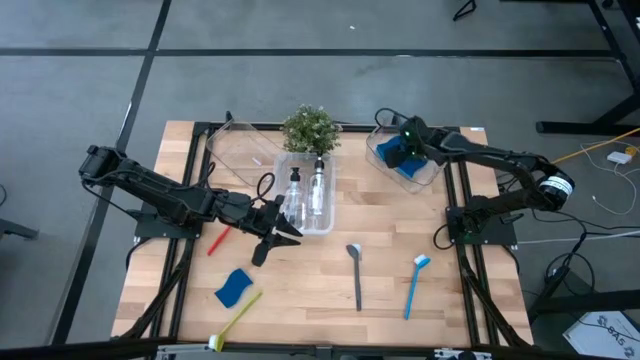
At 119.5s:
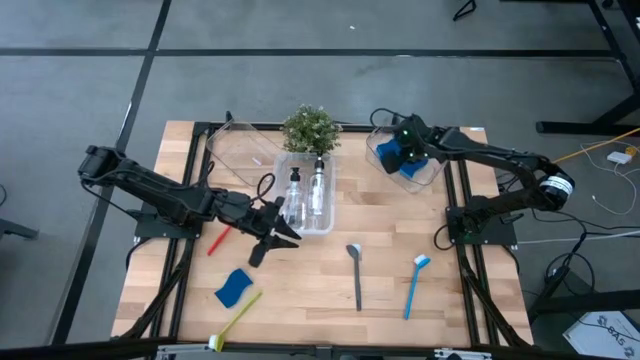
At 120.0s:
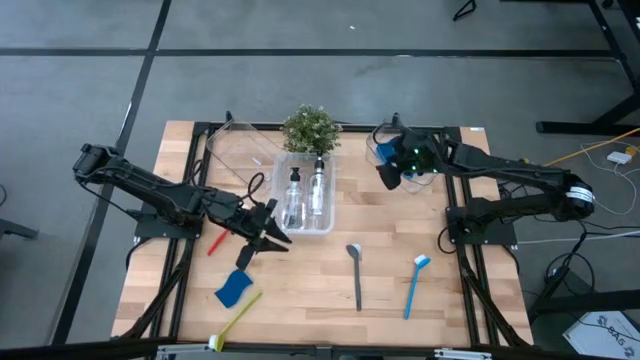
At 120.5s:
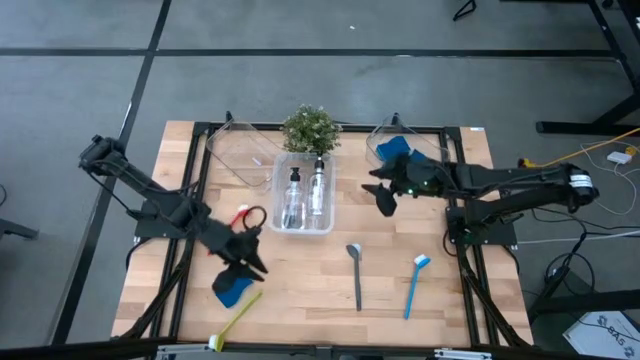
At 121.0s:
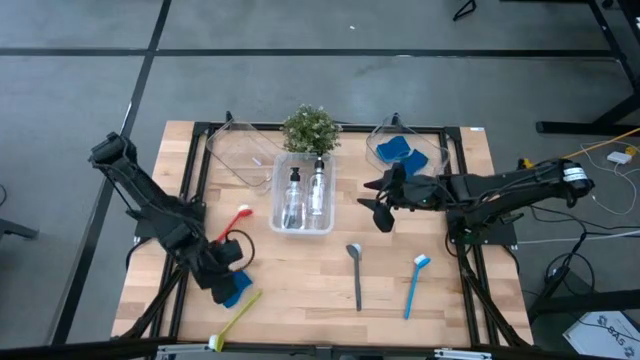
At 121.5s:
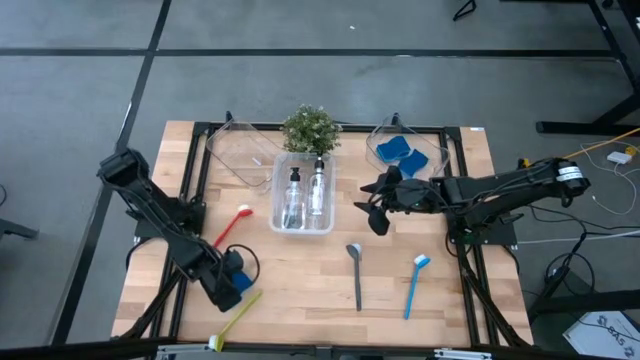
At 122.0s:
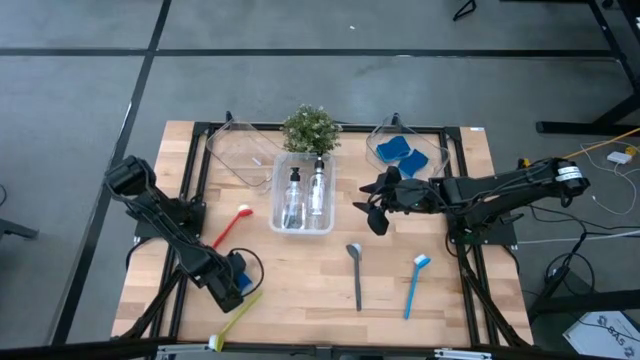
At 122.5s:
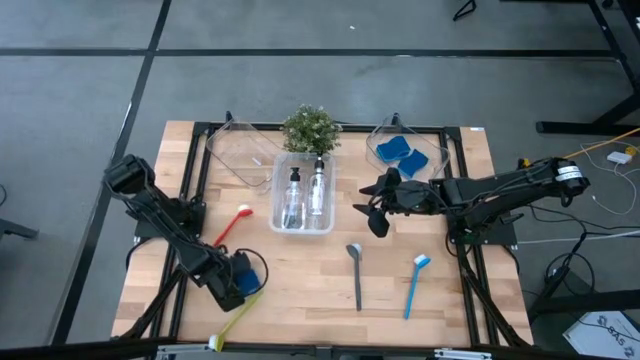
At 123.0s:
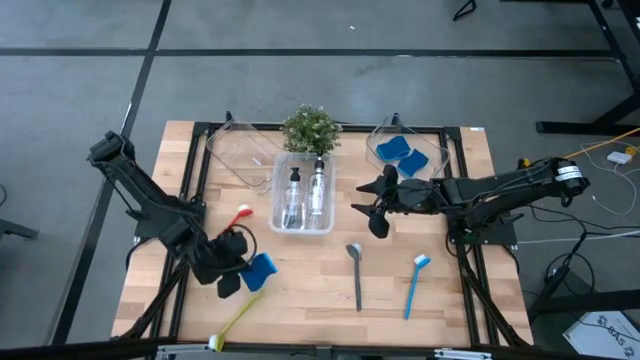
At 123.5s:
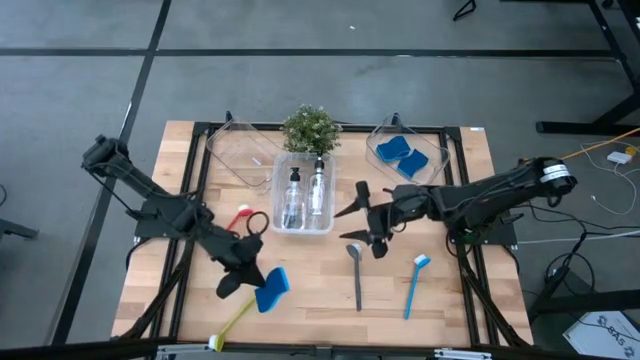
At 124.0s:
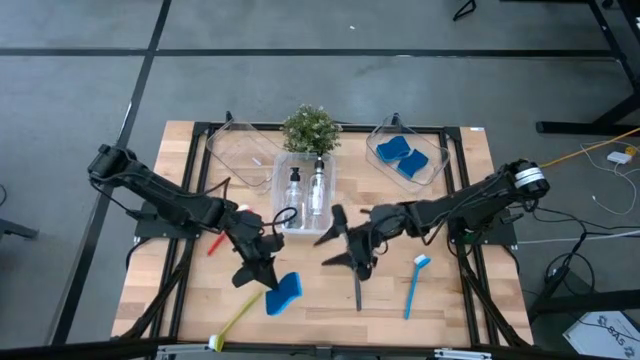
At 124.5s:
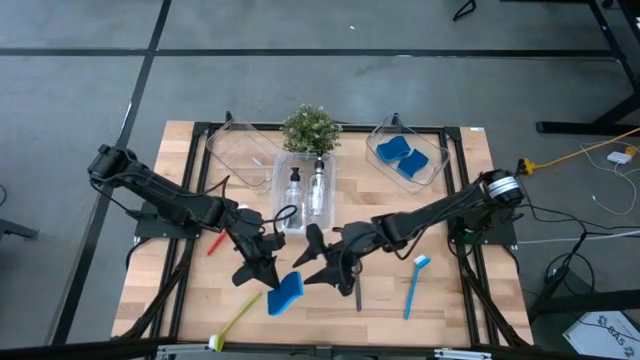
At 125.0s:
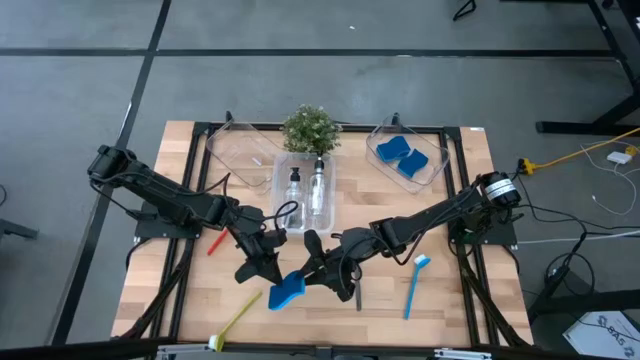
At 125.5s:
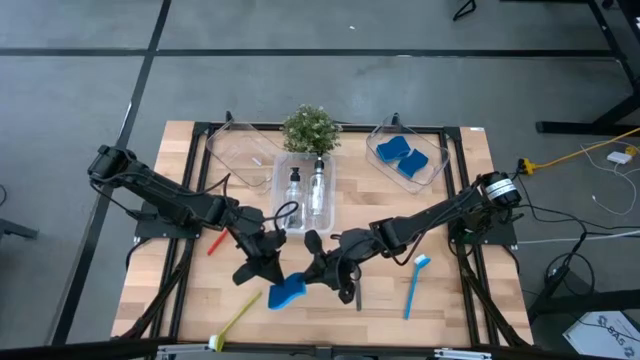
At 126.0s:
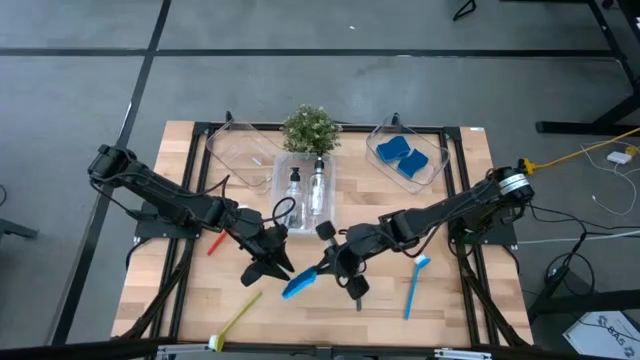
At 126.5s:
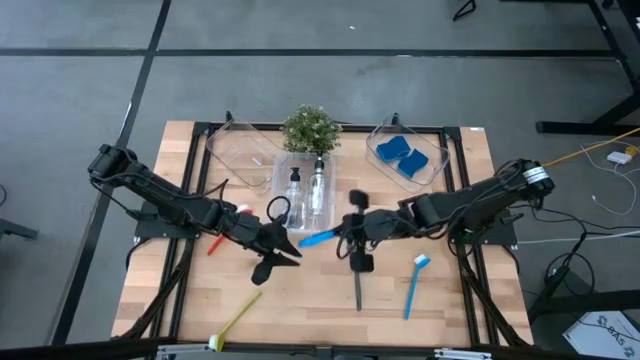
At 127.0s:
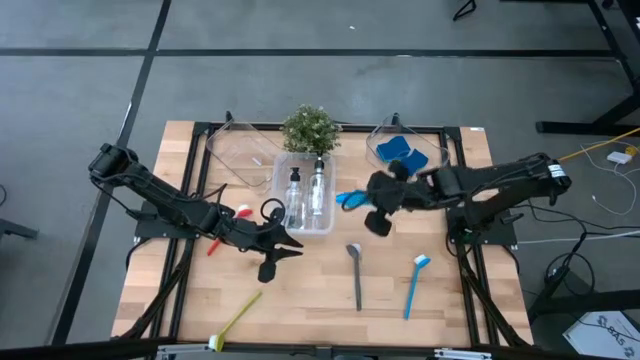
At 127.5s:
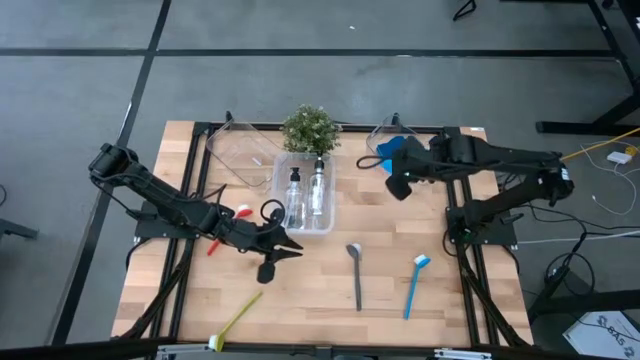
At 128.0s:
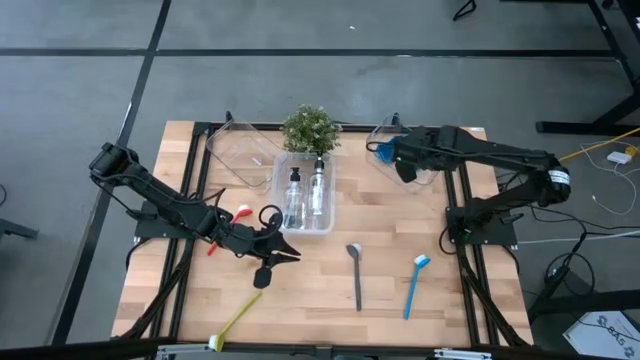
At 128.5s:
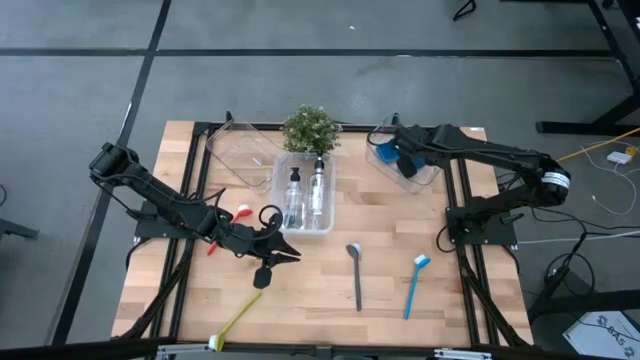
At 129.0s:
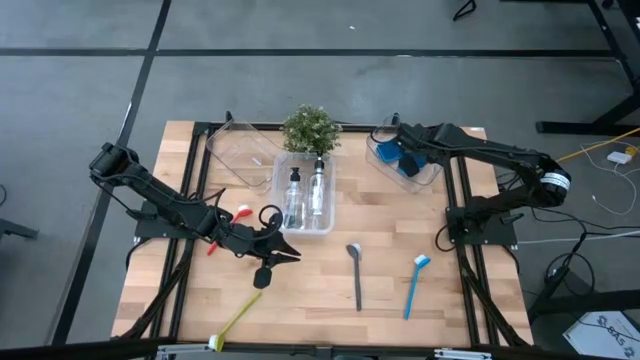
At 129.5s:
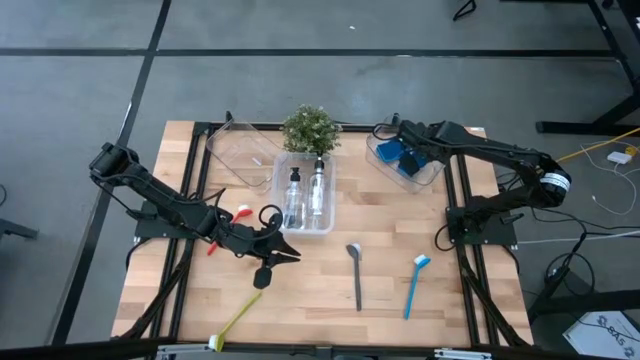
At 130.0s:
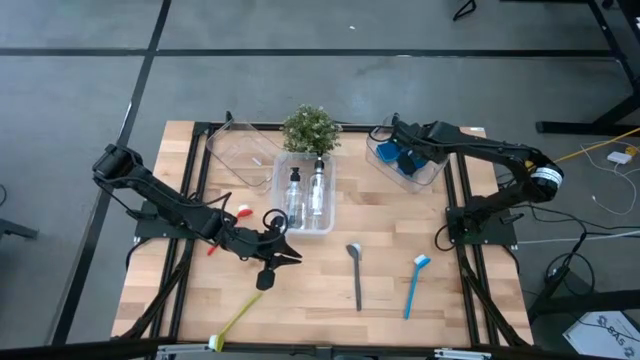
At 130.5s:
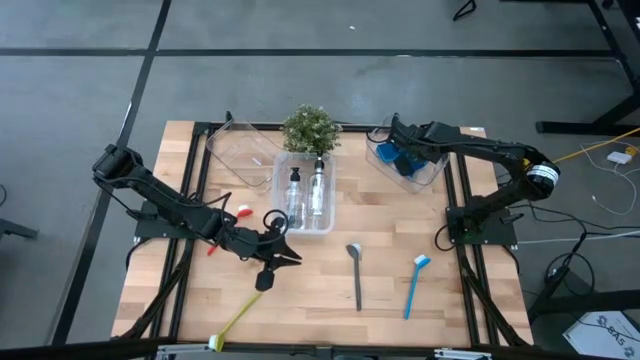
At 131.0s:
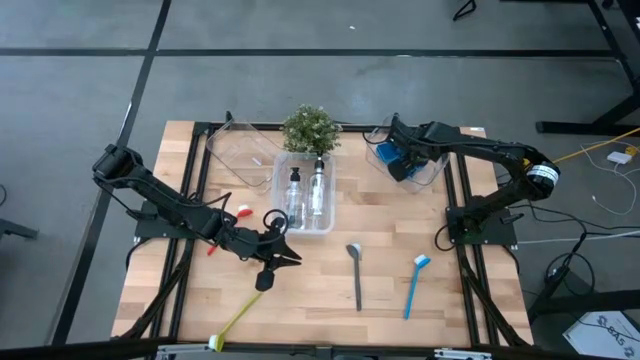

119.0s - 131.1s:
Task: Pick & Place Kitchen Sink Supplies
Put the blue sponge into the right transparent bin

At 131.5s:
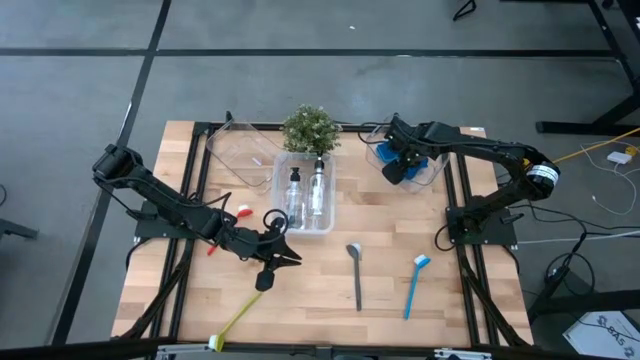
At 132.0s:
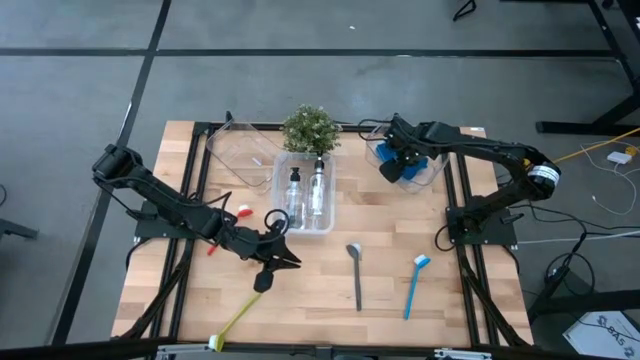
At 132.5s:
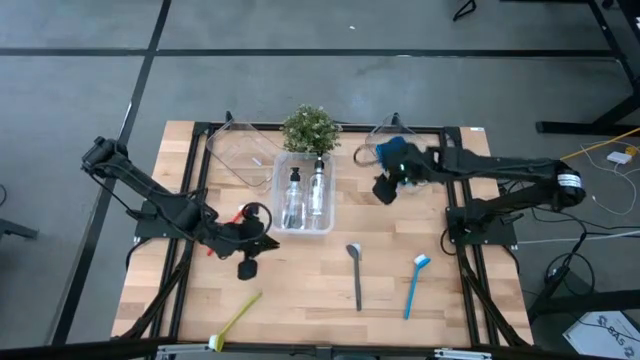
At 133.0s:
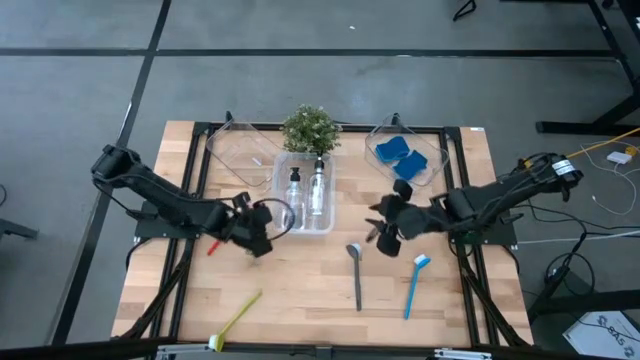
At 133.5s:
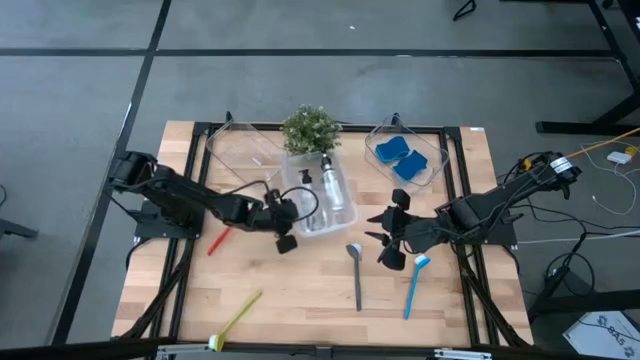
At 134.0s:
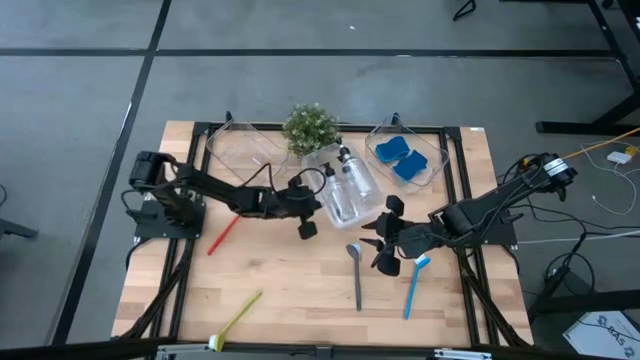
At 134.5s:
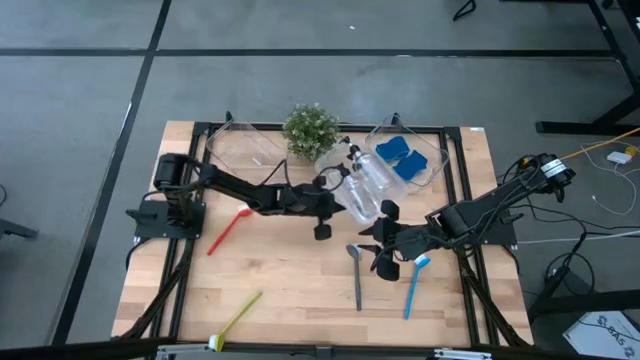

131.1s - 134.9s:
Move the white bin to the top right of the table

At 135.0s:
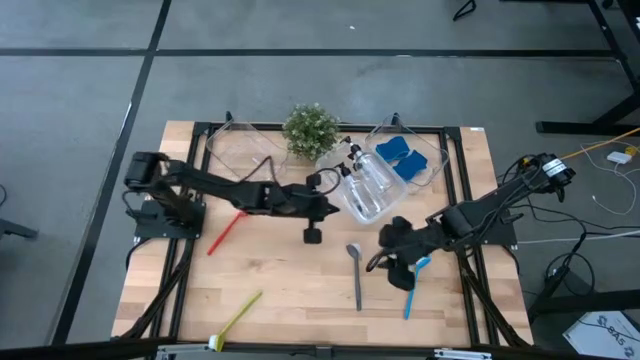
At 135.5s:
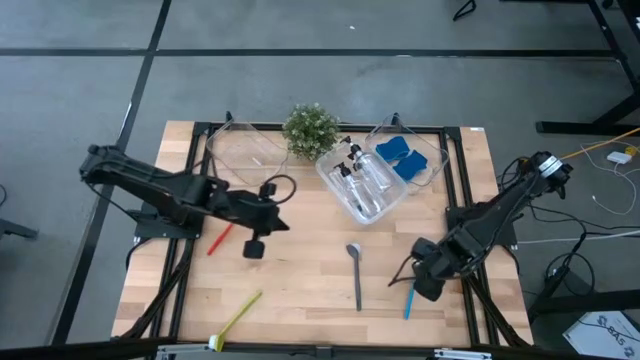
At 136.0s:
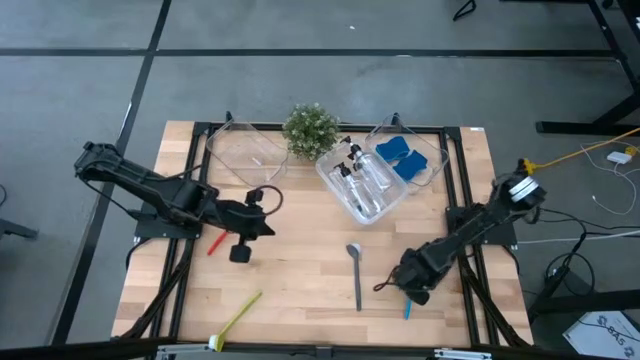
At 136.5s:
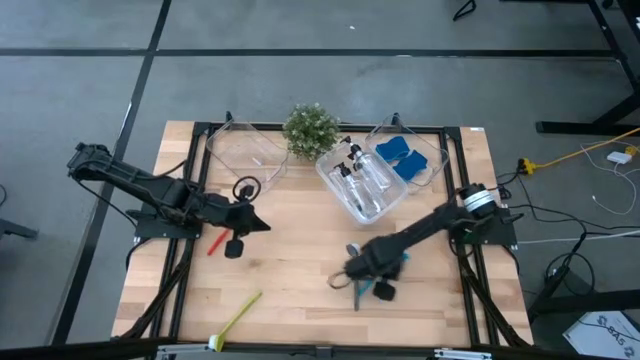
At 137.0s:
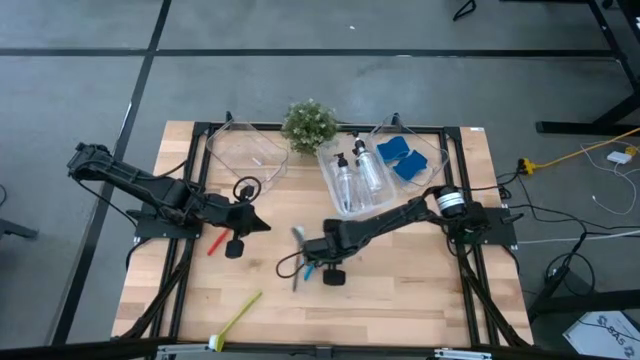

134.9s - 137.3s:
Move the blue dish brush to the middle left of the table

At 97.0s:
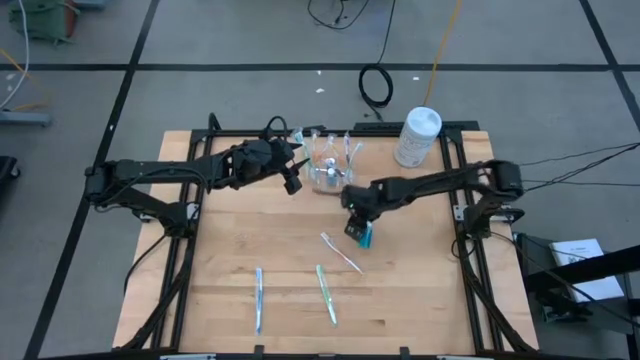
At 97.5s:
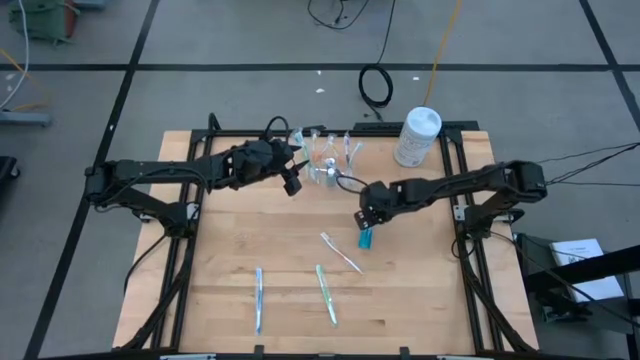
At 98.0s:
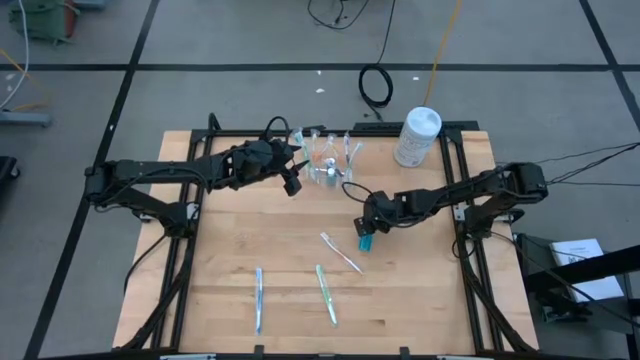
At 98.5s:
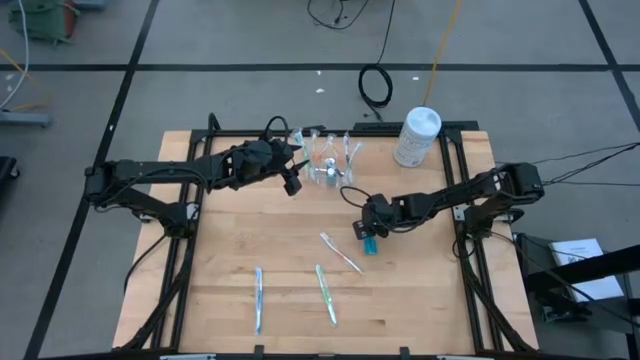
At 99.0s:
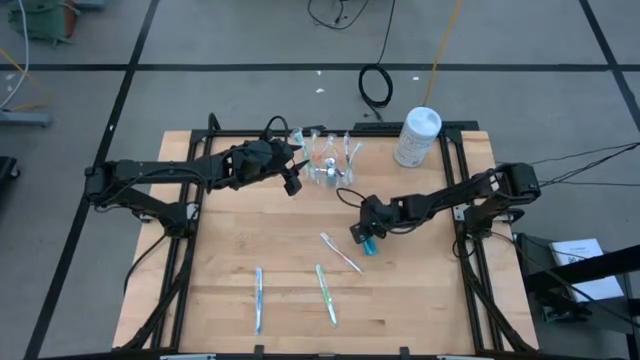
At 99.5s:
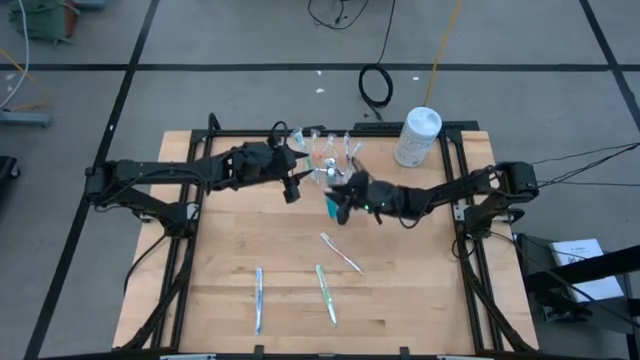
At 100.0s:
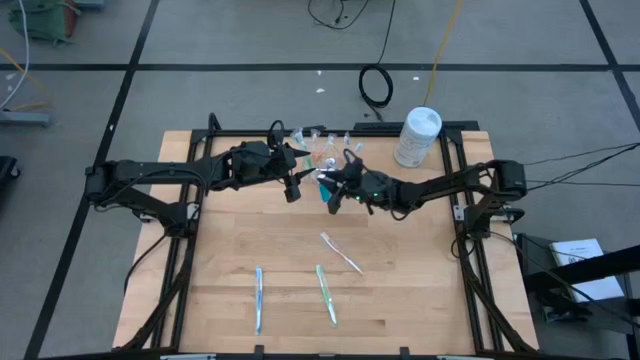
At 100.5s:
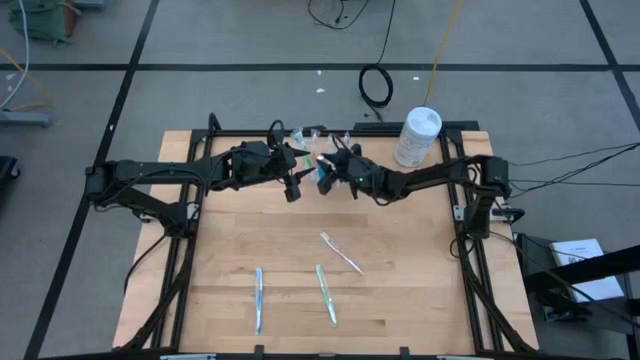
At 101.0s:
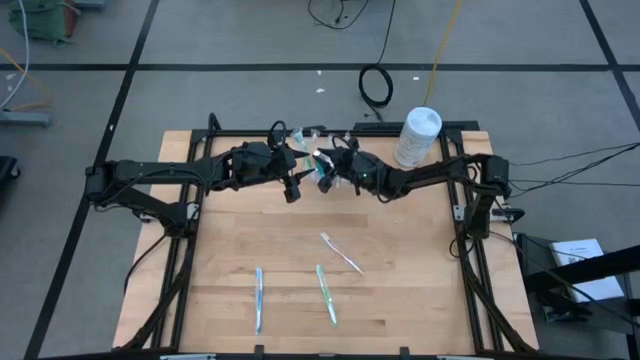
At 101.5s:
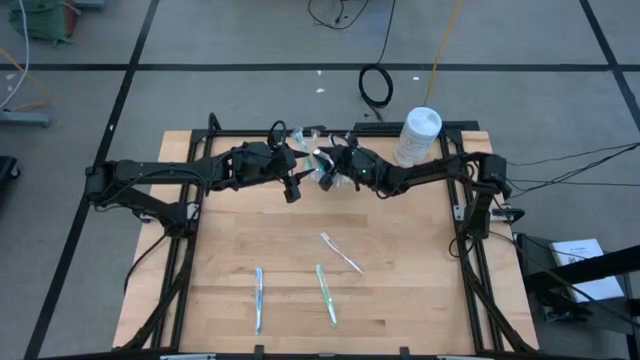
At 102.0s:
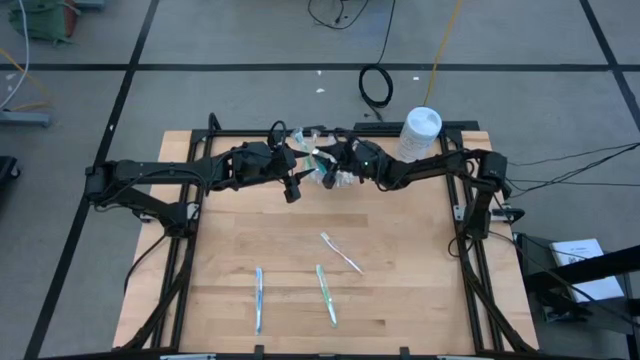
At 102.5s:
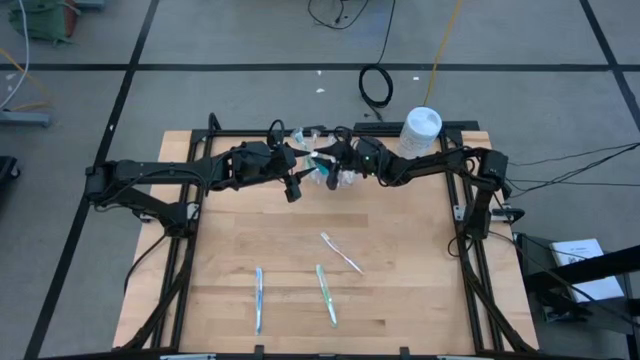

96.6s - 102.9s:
Task: Pick & Place toothbrushing station
Put the blue mouthwash into the transparent organizer
